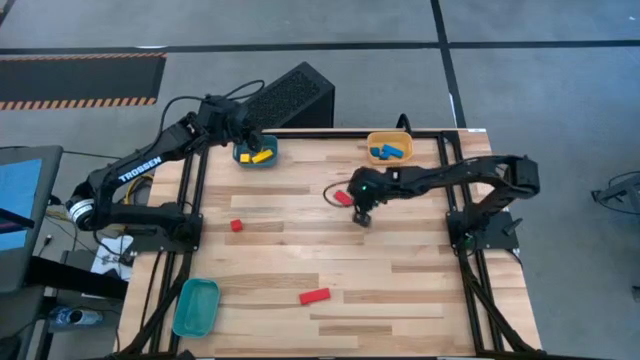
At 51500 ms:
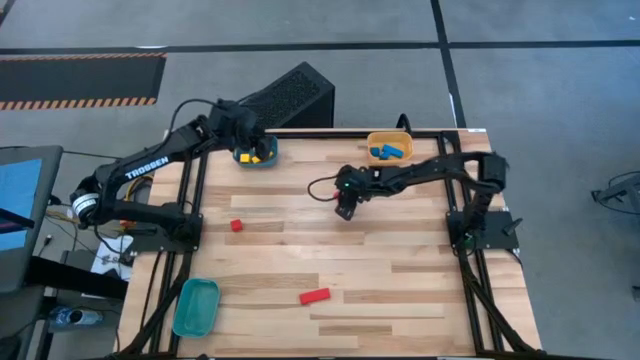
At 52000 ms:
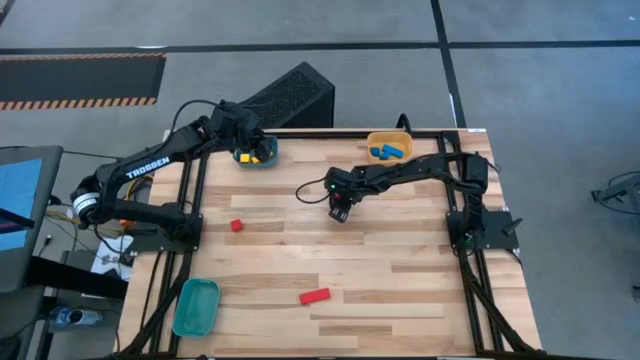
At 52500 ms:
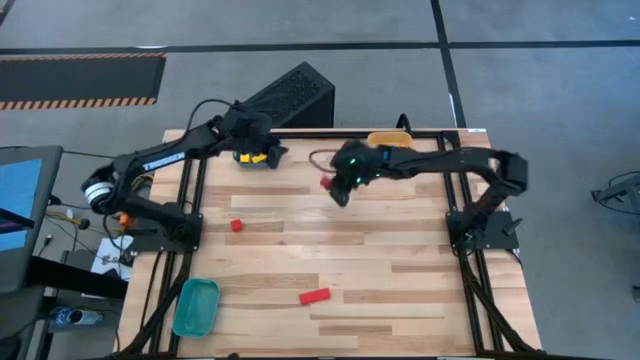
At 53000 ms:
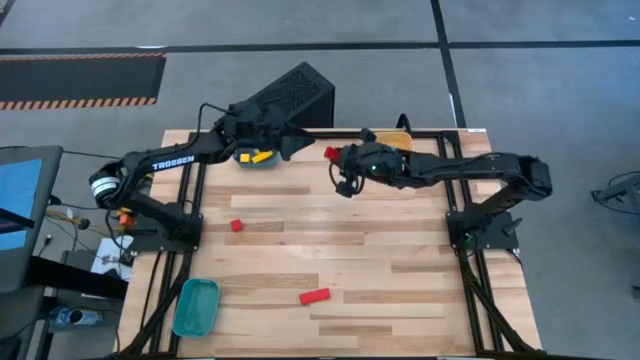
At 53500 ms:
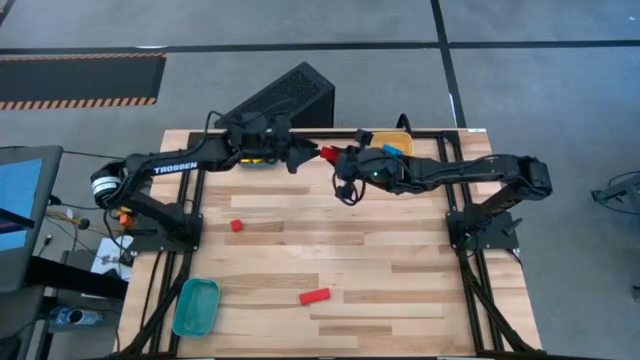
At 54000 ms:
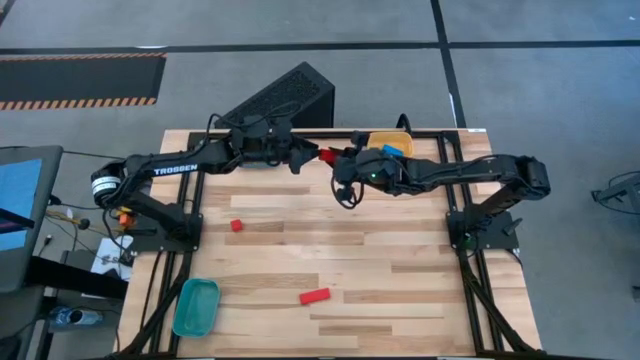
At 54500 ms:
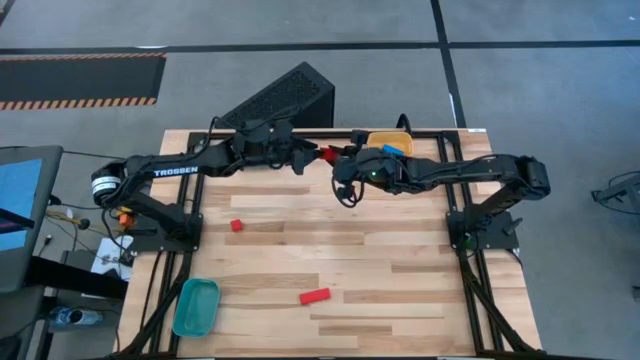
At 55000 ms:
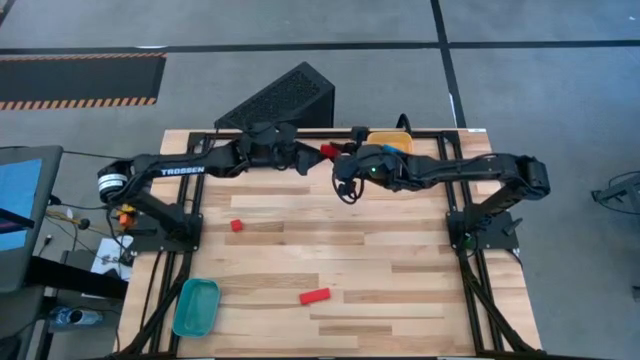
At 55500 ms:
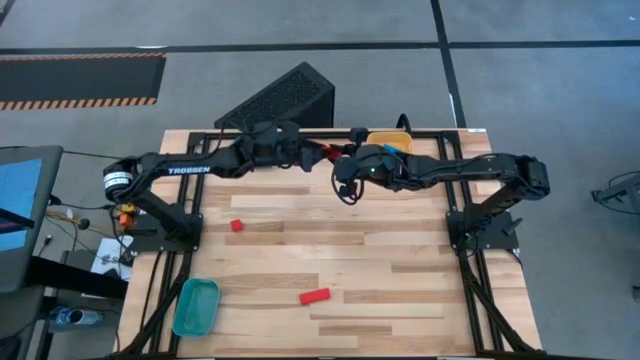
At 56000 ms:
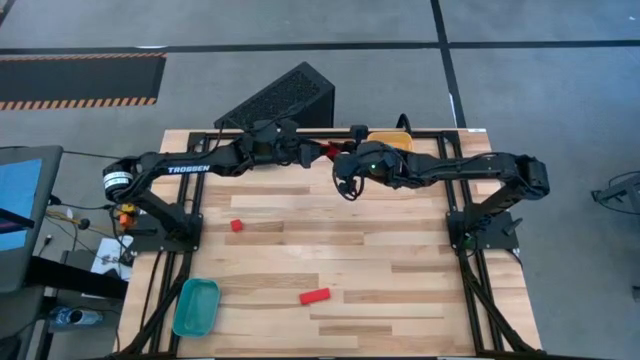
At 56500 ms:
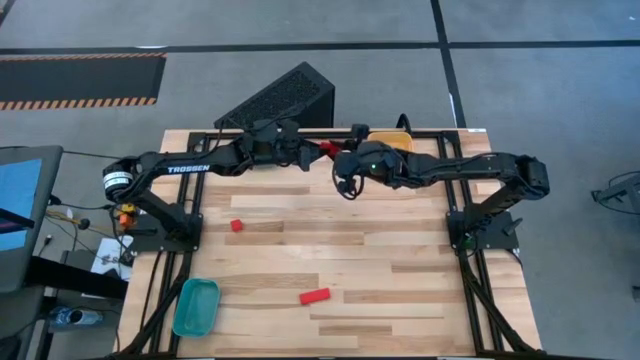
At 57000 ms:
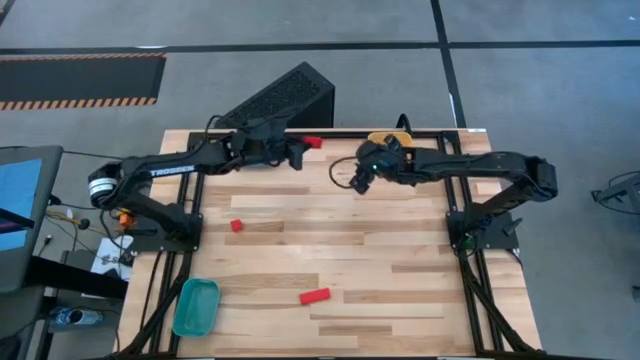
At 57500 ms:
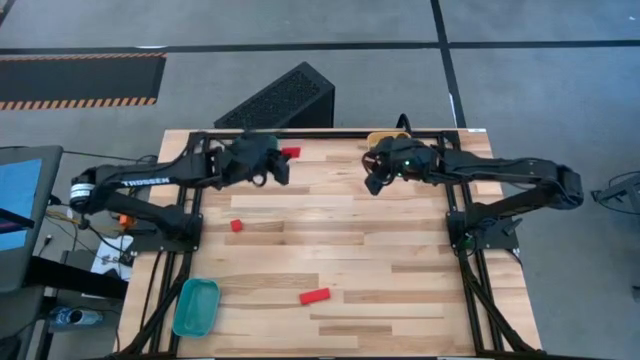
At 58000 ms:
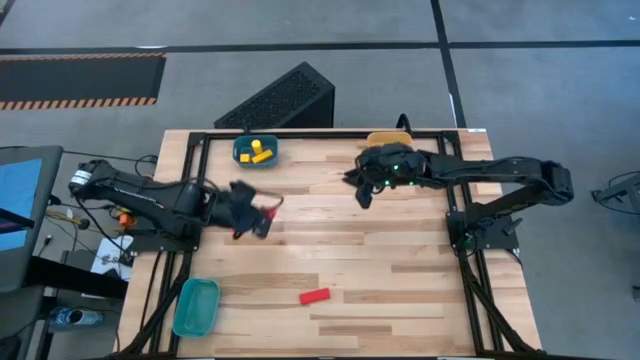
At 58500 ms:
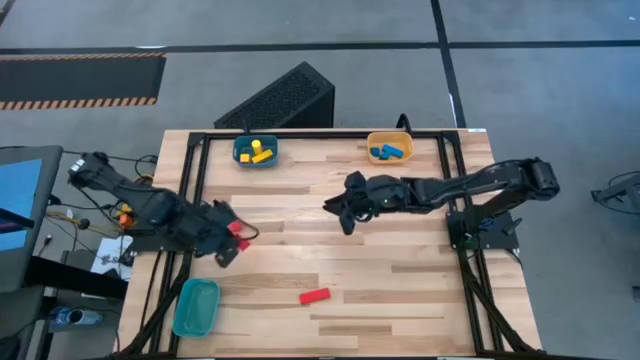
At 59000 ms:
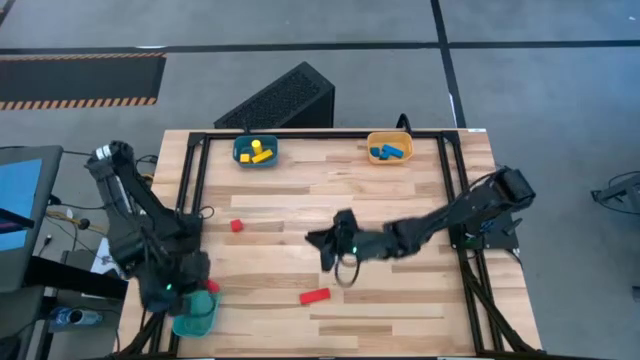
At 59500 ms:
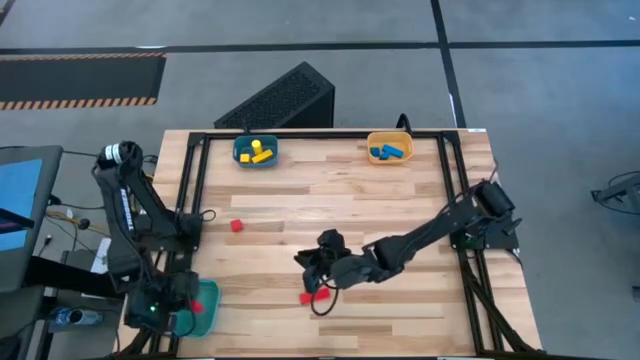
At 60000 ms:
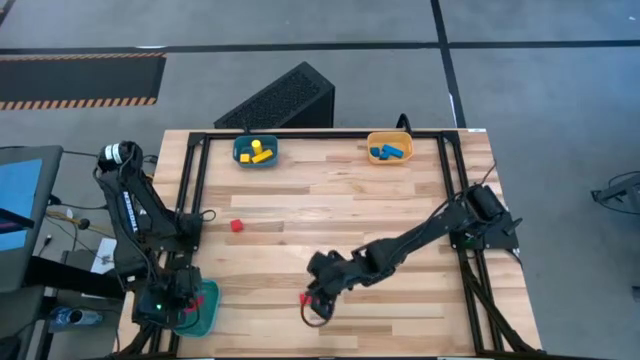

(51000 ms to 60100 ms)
Task: Sort & place blocks by color
Put the top red block into the blue bin

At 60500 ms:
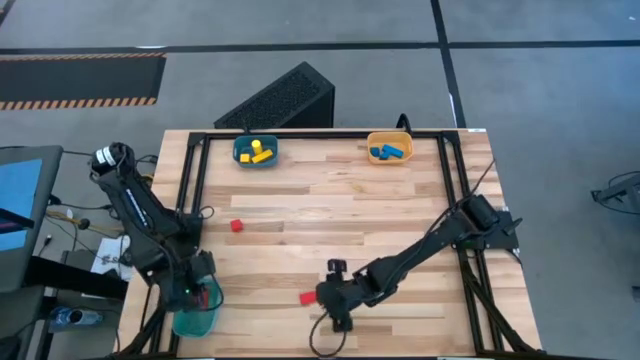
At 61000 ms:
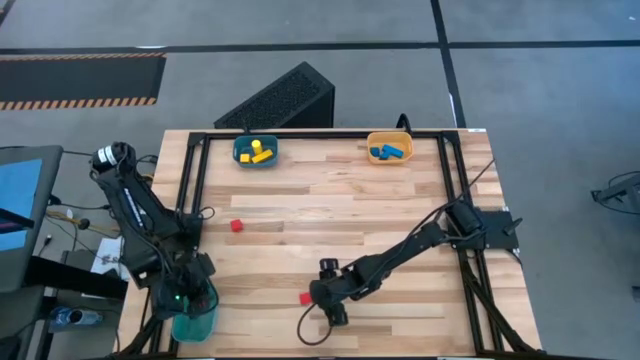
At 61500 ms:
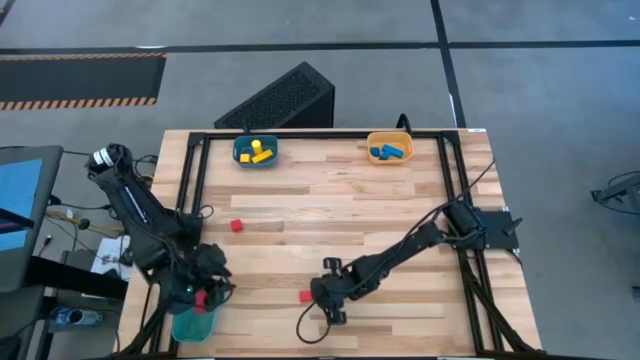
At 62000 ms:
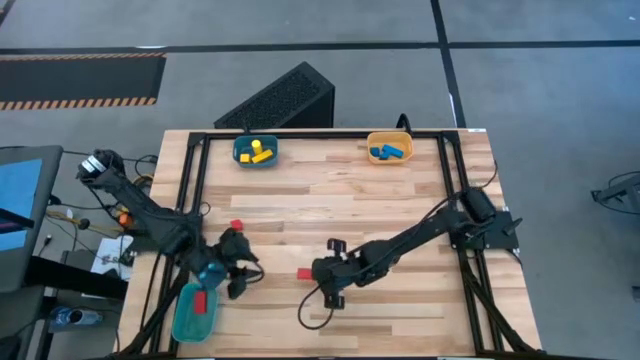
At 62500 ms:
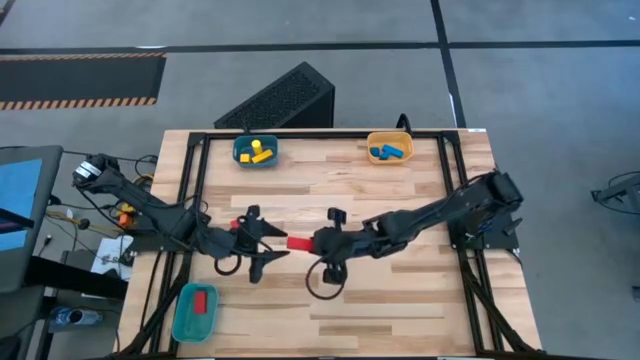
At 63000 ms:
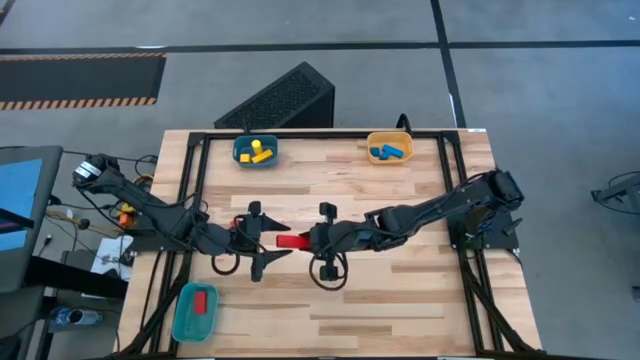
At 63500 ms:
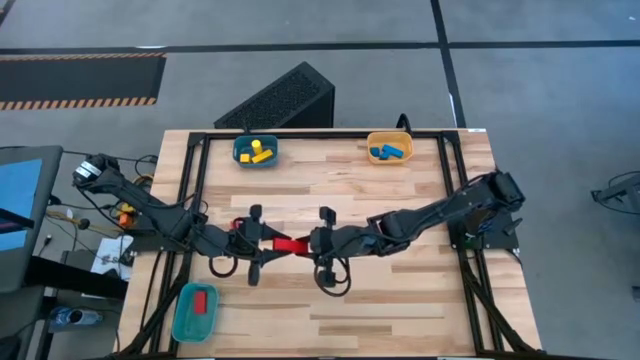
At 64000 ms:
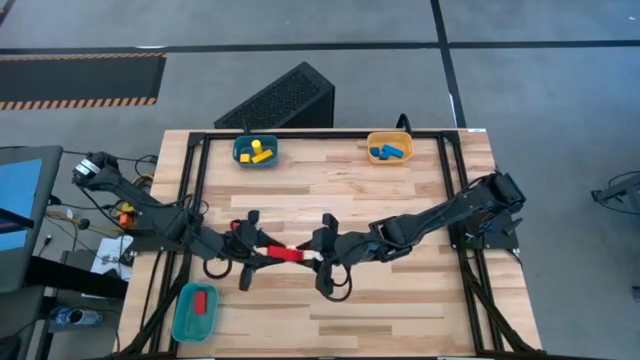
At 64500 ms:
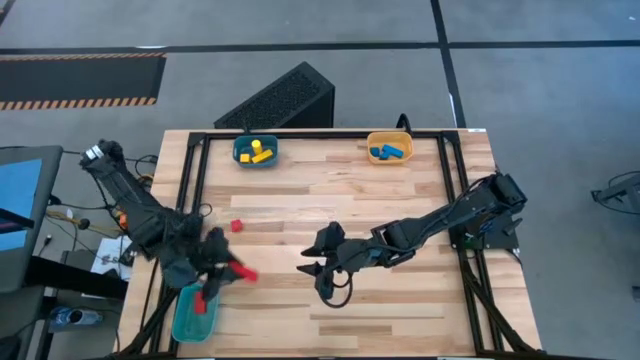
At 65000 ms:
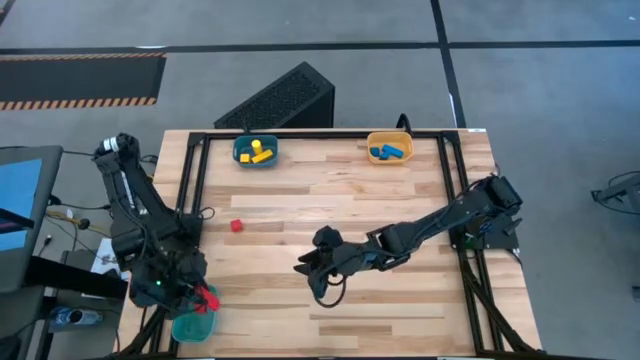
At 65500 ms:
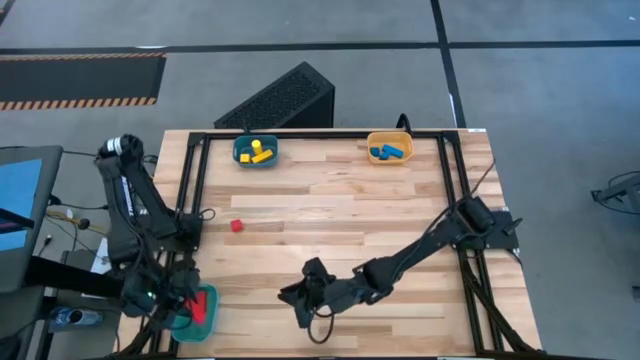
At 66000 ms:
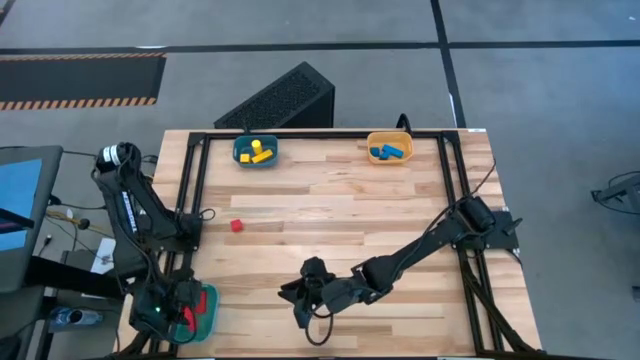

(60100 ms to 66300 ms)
Put the red block into the blue bin

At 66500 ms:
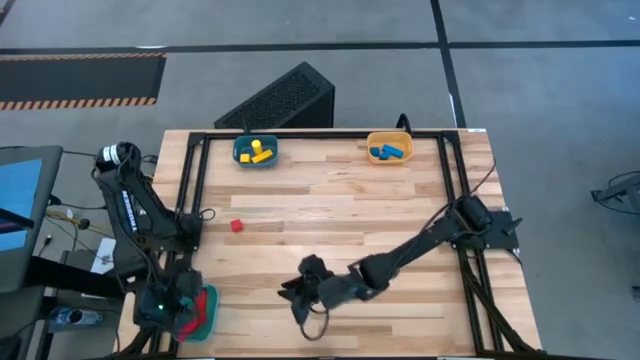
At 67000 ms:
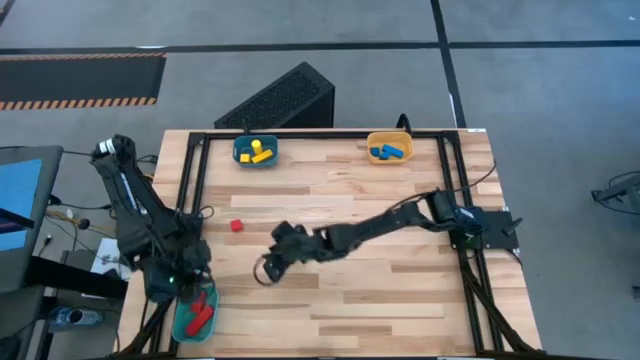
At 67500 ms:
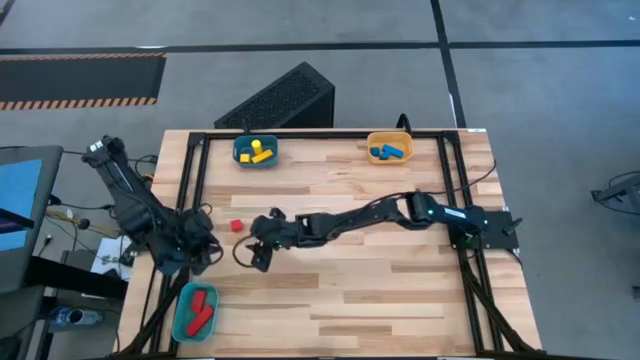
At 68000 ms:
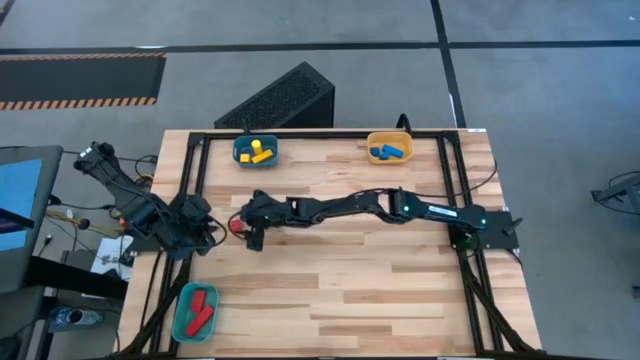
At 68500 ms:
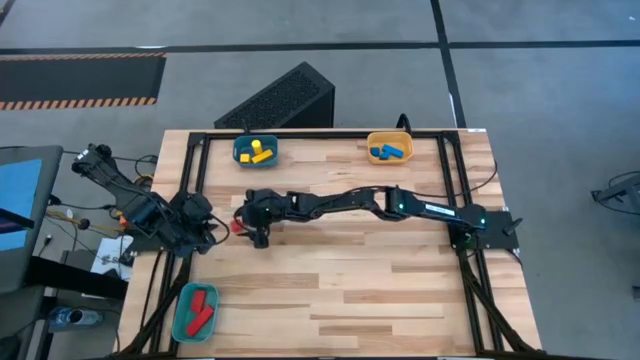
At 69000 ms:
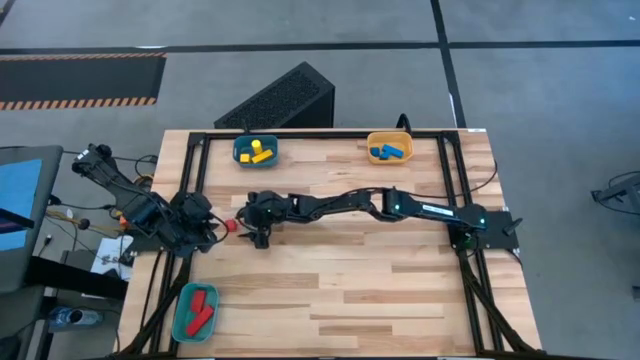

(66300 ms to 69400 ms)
Put the red block into the blue bin

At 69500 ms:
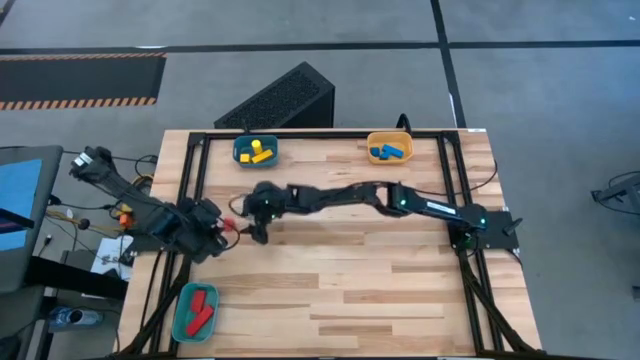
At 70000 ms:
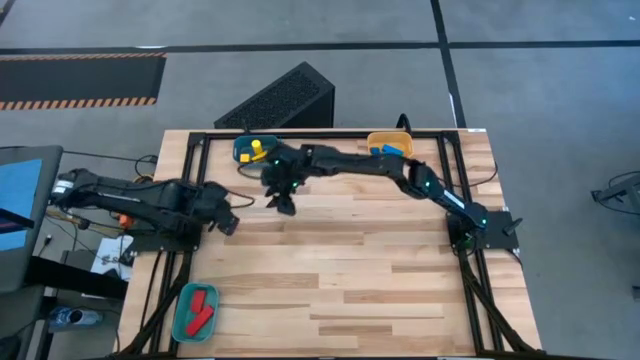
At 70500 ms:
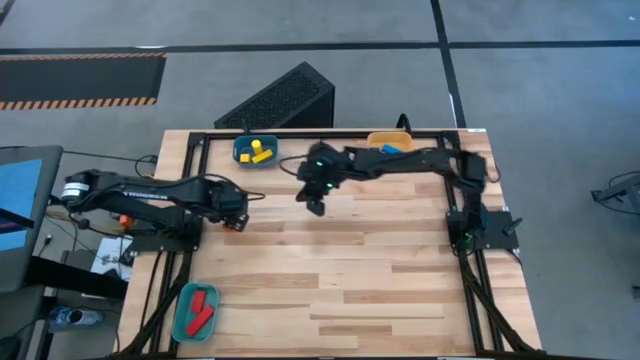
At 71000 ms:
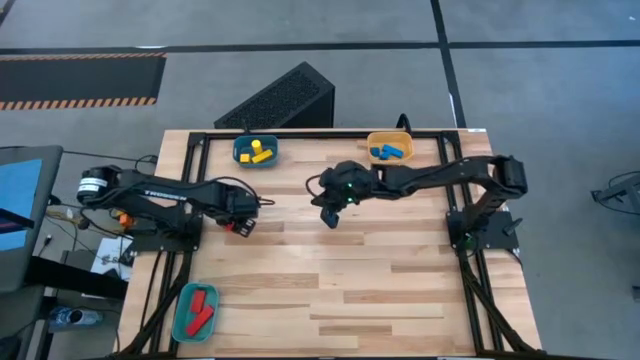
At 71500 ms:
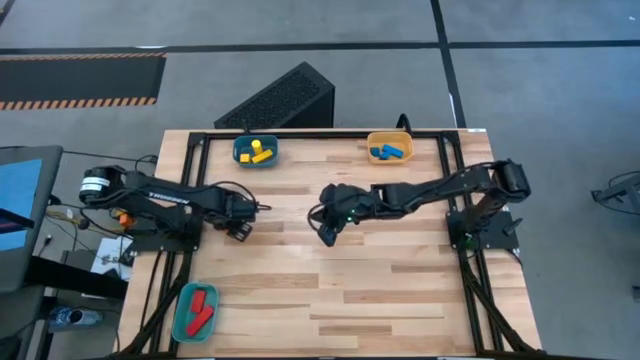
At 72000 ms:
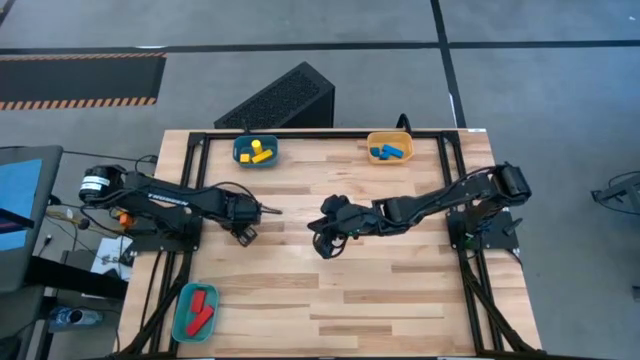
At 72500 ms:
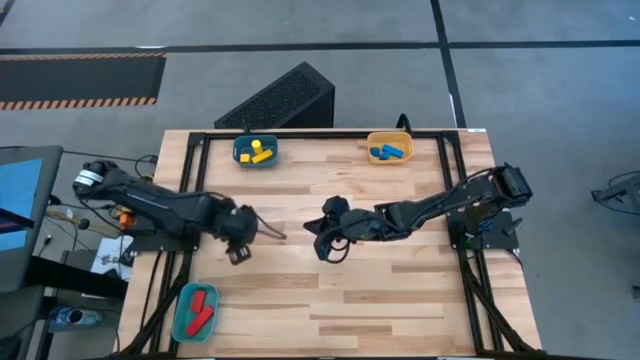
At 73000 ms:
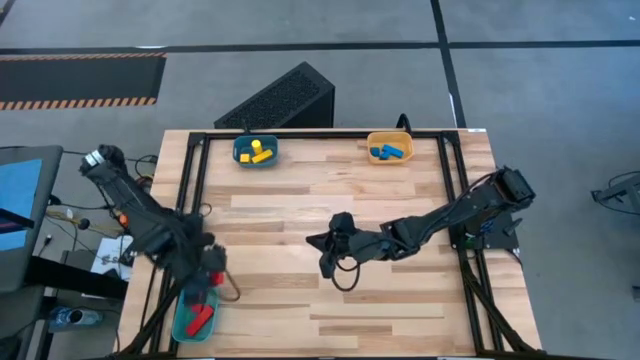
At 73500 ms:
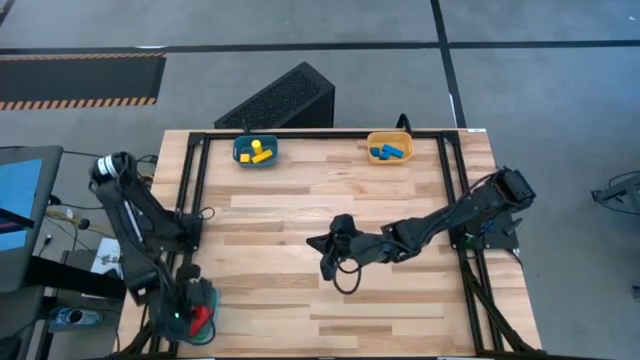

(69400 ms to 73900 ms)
Put the red block into the blue bin
